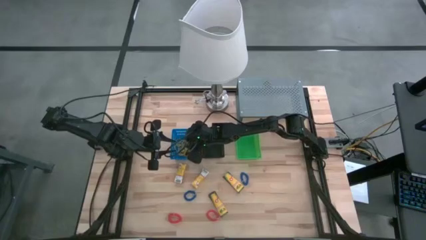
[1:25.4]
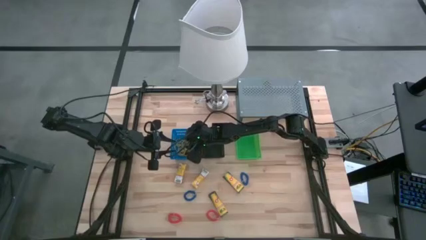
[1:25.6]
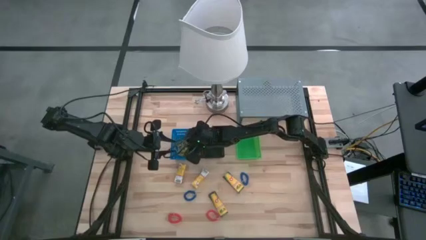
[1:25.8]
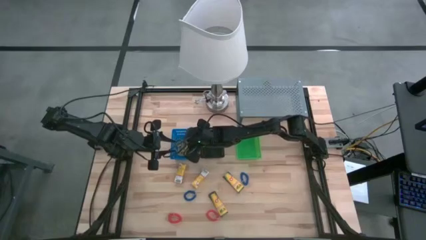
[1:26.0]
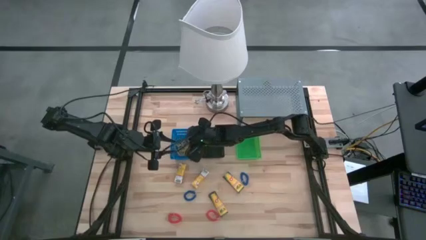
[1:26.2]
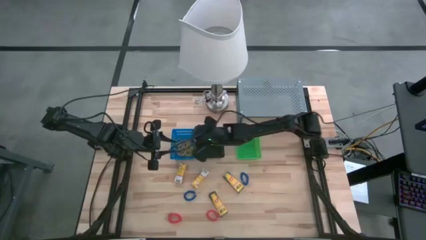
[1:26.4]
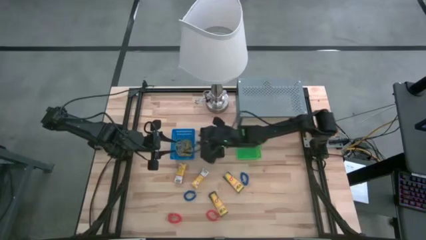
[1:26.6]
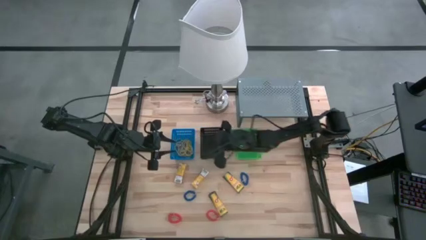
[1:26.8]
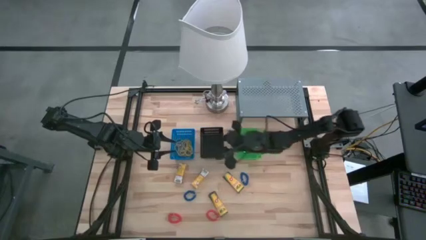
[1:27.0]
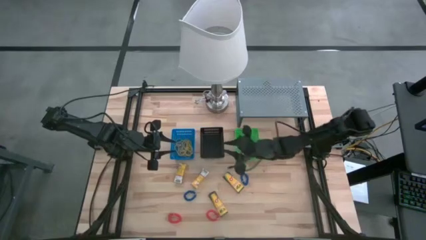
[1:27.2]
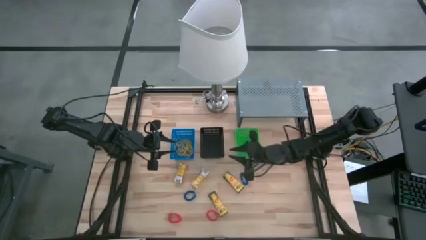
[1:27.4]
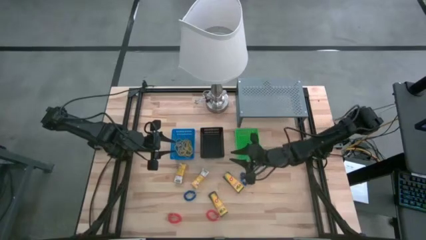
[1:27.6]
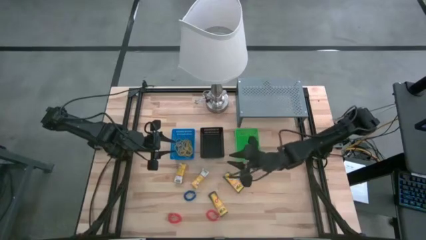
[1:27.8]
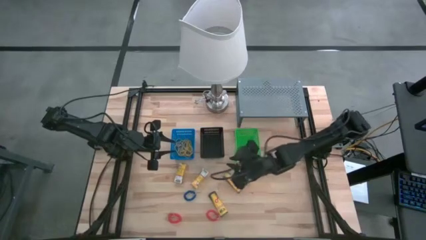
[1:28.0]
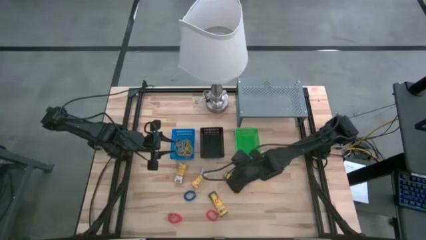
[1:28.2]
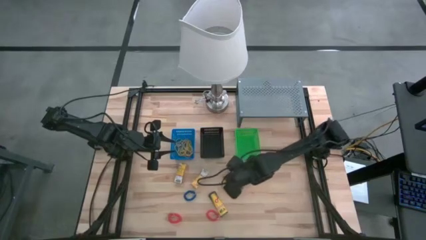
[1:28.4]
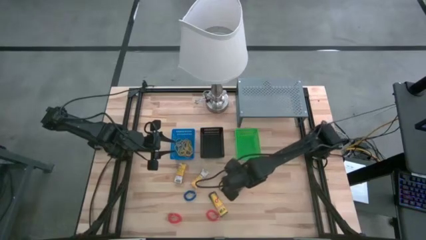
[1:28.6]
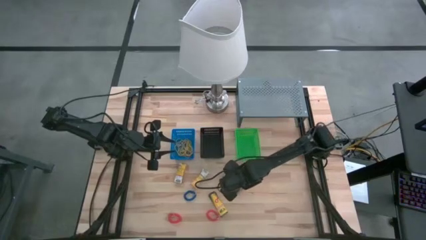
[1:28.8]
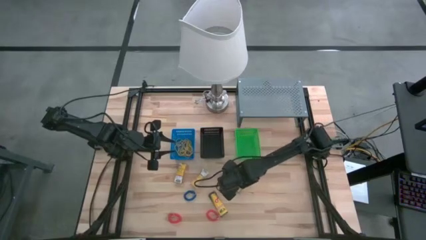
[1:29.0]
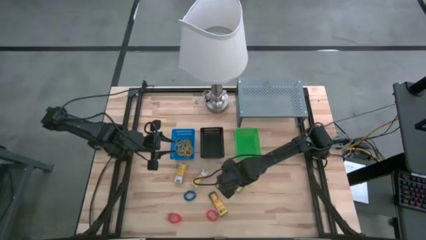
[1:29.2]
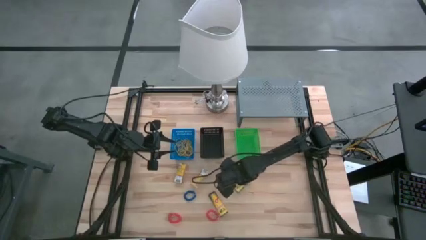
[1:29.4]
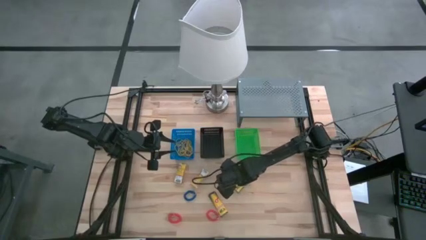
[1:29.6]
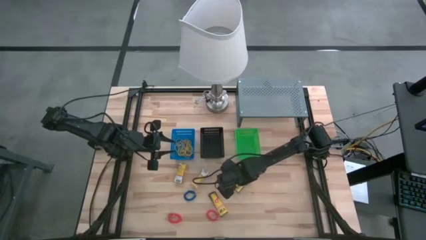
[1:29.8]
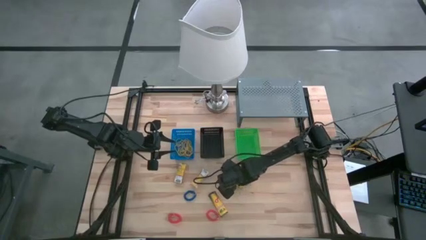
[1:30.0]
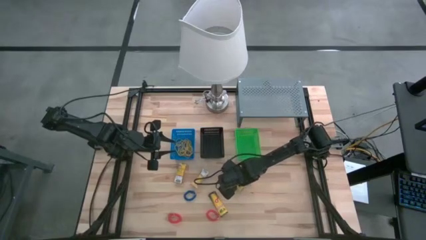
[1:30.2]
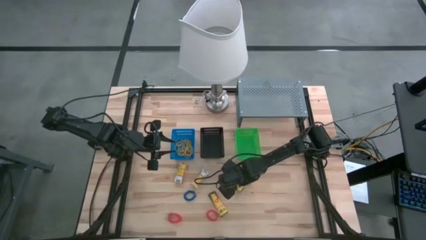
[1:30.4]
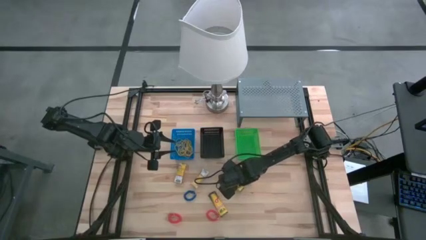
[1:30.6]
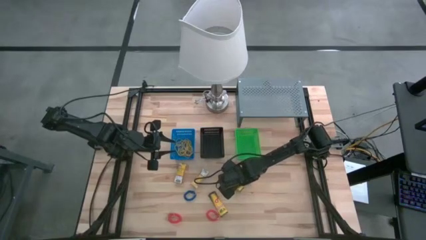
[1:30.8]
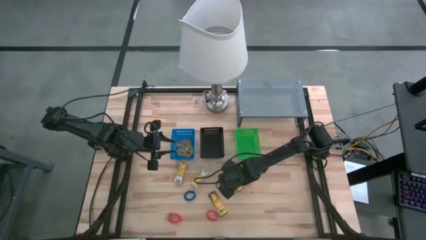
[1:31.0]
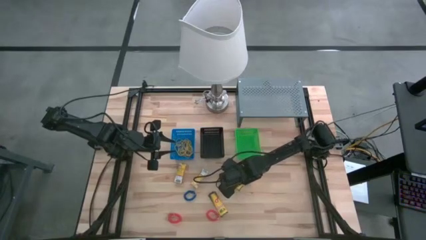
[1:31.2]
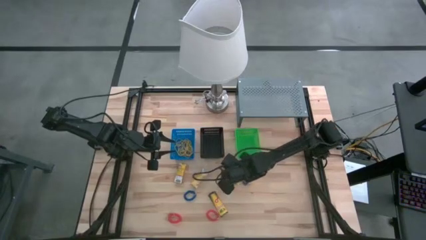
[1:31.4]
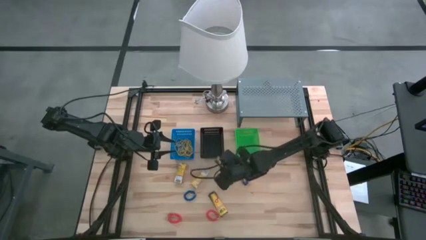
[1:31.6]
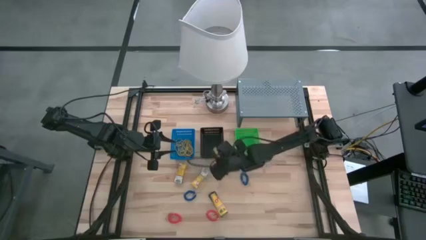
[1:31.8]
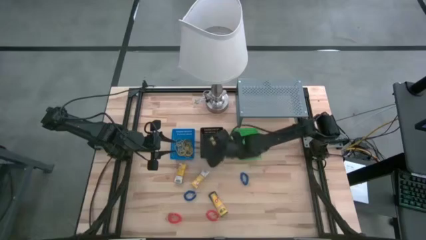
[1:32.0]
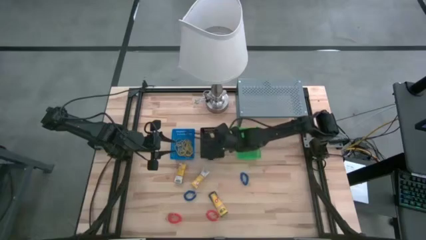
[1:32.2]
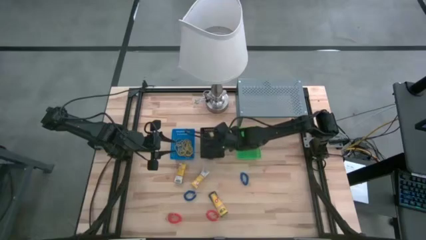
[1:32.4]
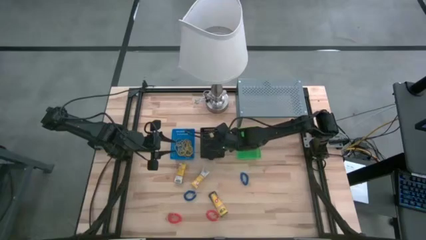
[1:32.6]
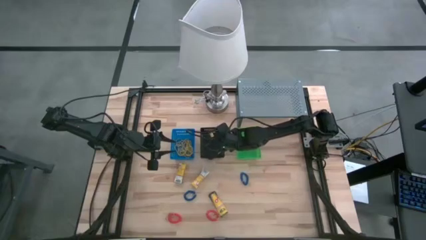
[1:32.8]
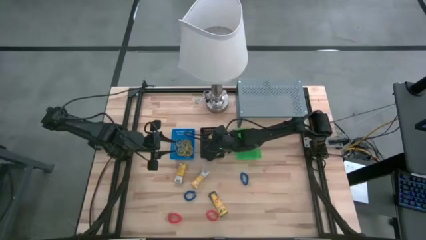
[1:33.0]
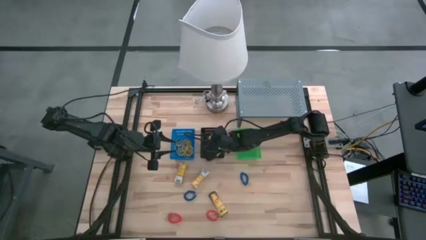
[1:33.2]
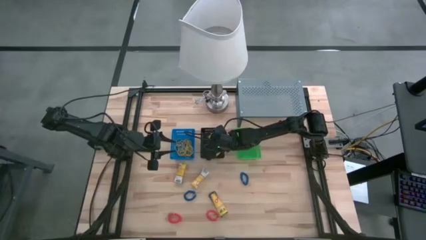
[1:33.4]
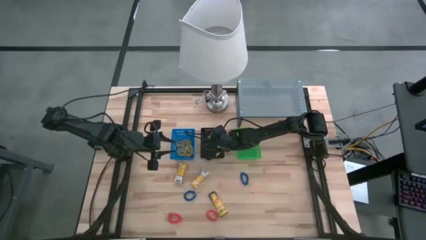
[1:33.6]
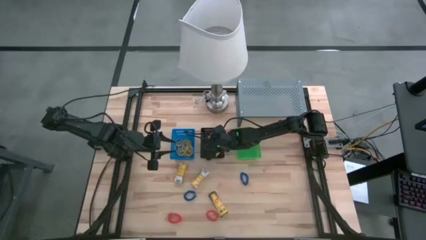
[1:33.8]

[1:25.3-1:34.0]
Task: Pick & Place Office Desk Supplies
Put the yellow crayon box into the black bin

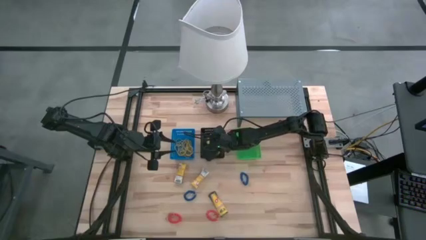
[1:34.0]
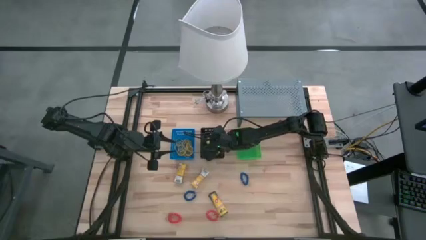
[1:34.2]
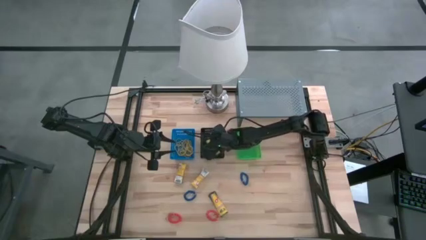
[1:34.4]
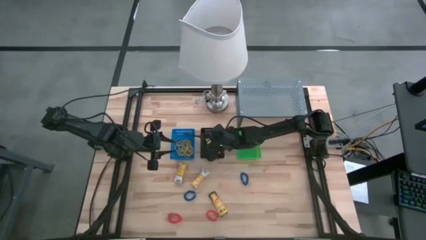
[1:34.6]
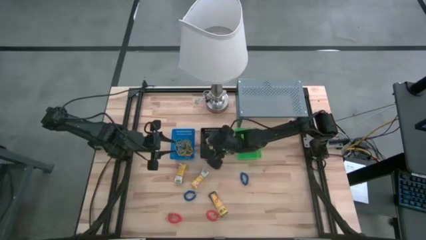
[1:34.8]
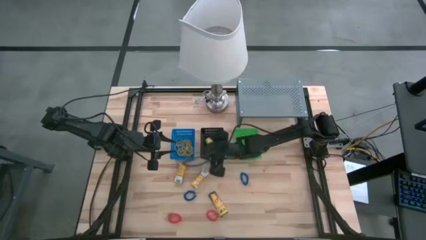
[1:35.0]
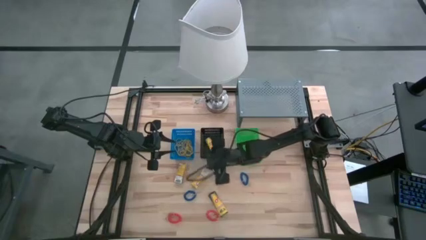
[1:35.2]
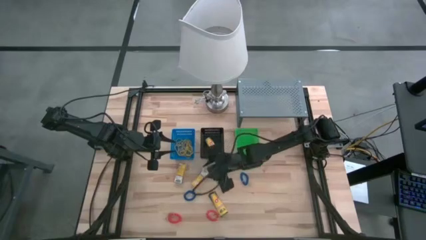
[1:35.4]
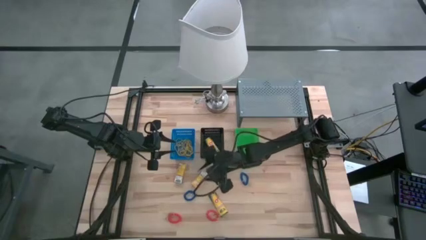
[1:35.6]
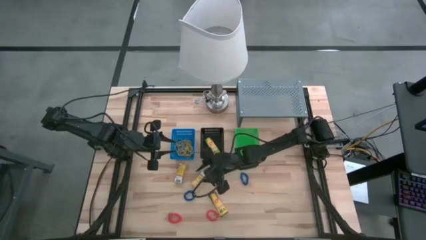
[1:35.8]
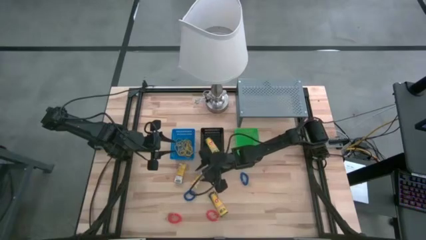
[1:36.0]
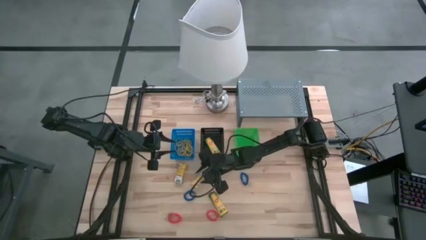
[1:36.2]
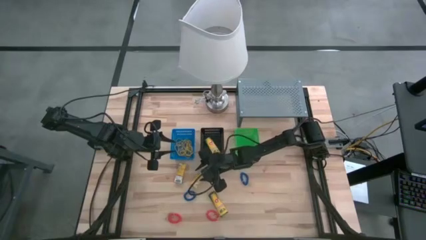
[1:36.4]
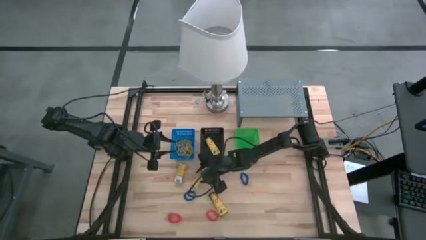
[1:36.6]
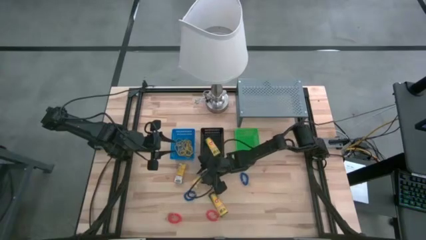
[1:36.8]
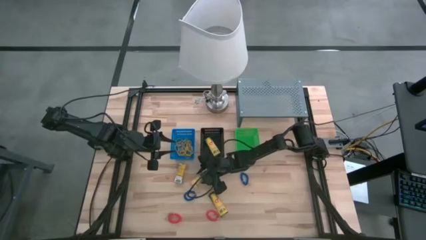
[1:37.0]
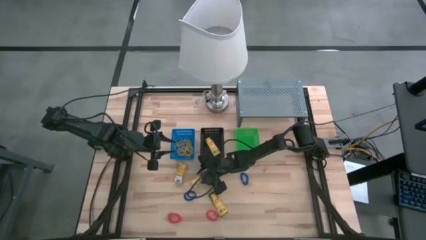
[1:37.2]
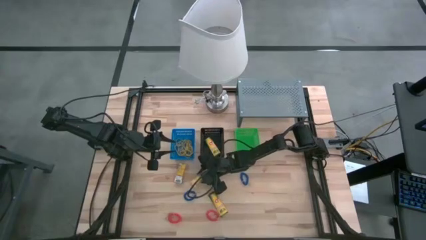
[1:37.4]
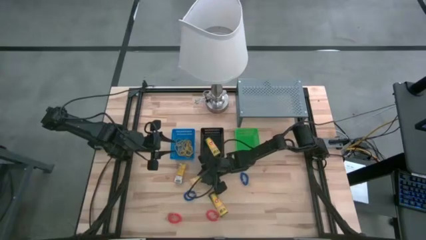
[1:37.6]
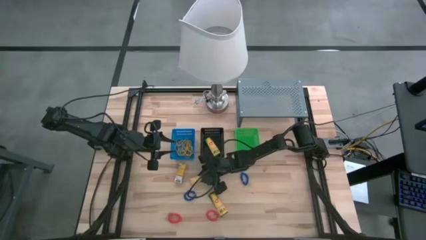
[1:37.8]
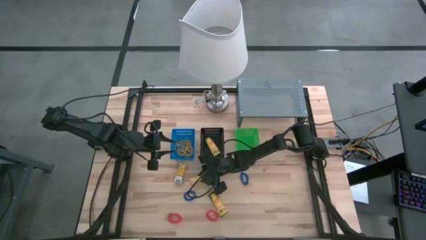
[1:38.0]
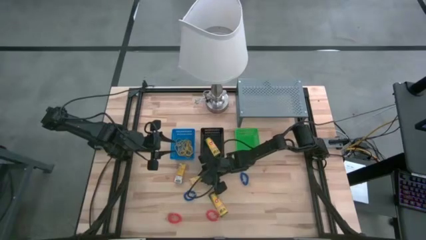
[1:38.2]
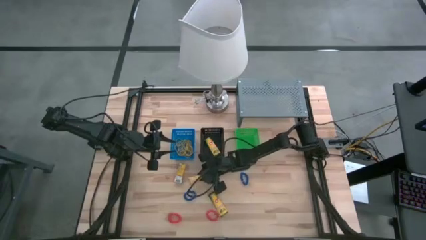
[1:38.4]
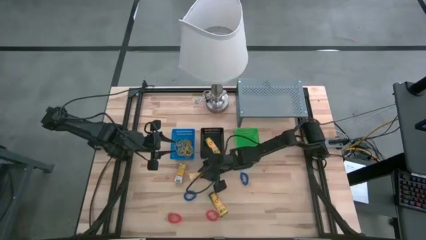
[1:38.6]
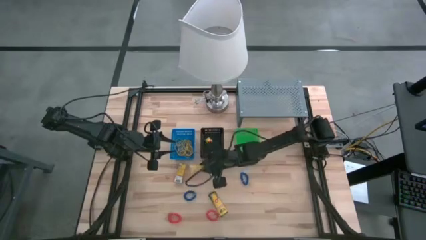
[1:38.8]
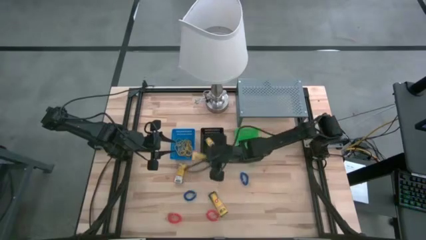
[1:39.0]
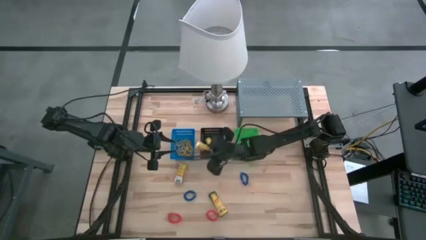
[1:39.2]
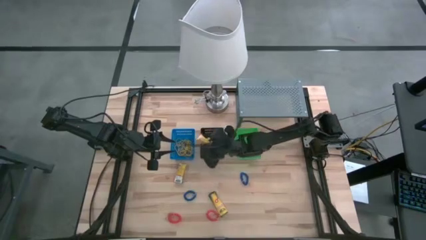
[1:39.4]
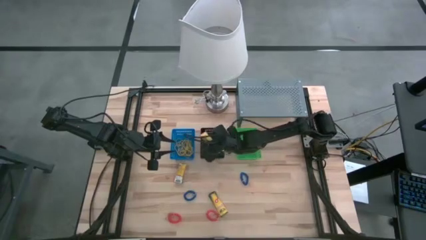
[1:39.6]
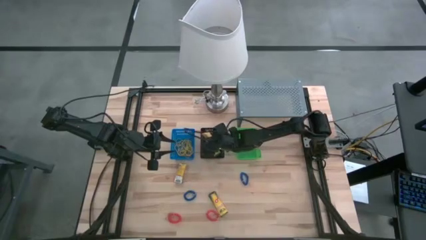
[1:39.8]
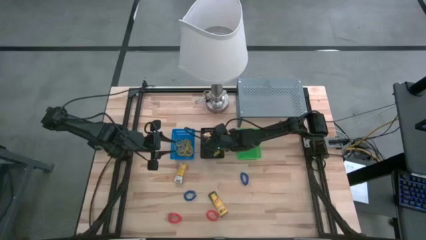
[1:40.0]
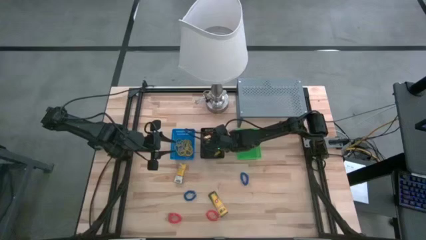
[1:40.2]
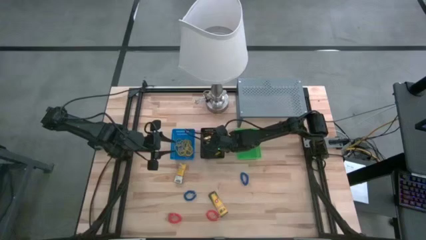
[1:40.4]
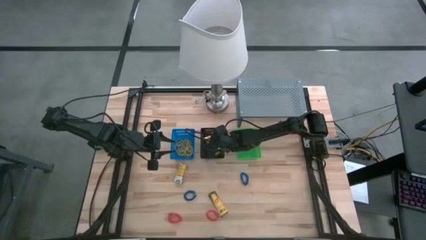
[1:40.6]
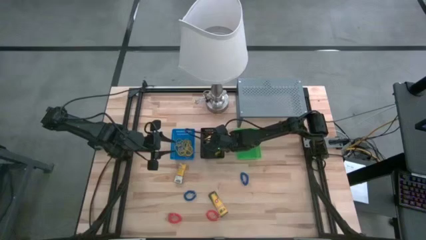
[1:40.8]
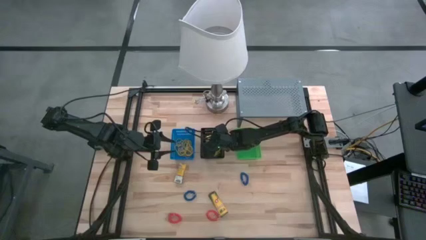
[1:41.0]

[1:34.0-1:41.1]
Put the yellow crayon box into the black bin

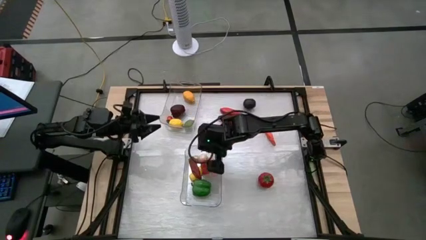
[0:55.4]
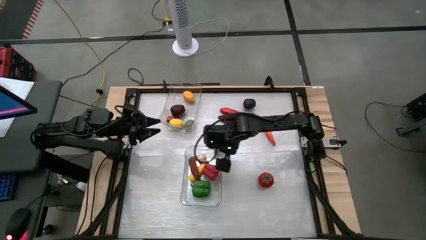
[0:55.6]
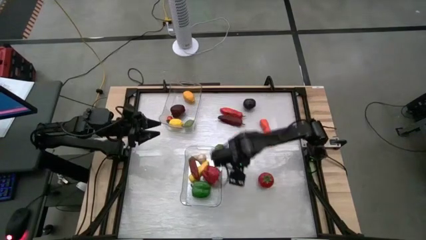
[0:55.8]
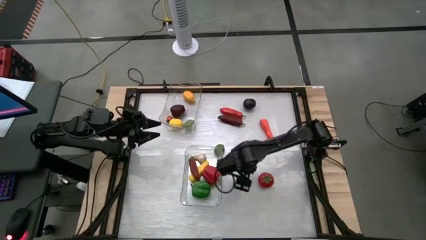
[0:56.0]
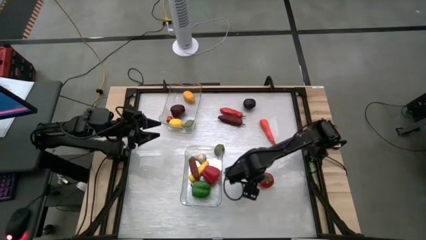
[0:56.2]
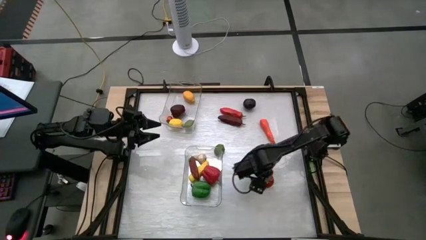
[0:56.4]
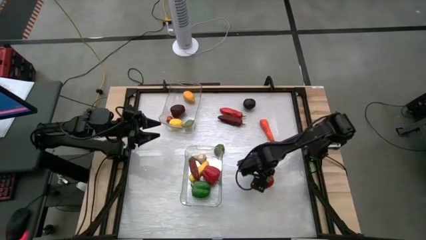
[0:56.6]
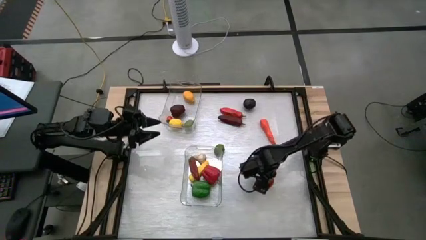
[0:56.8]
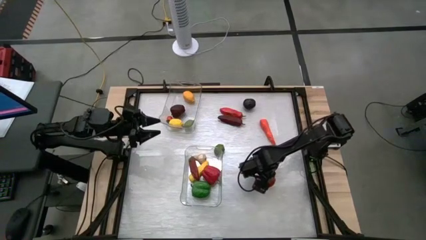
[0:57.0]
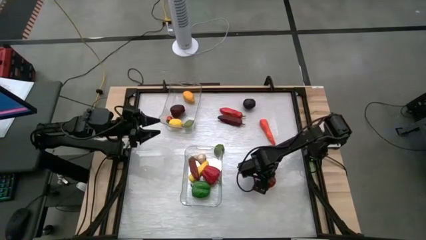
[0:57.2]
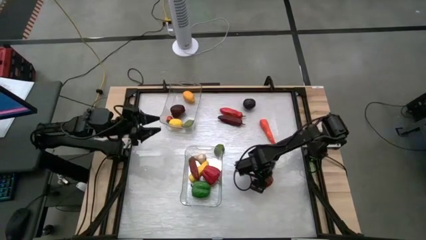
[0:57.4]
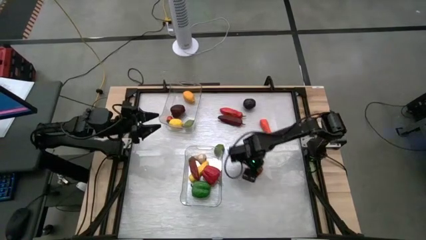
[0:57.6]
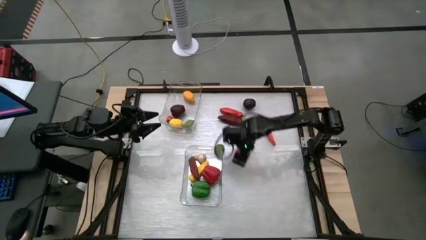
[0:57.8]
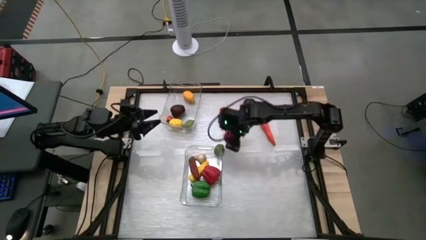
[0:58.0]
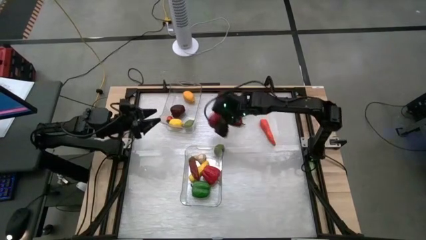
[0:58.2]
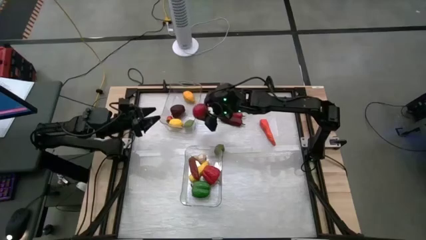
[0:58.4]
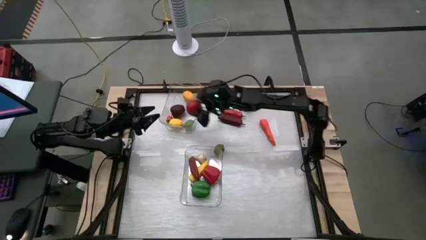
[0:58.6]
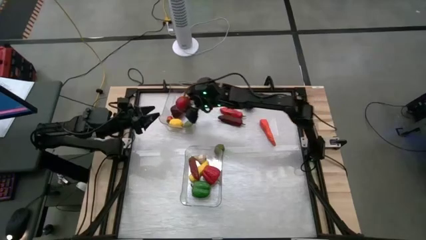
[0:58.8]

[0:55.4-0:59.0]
Task: Sort produce into baskets
Put the tomato into the top transparent bin
